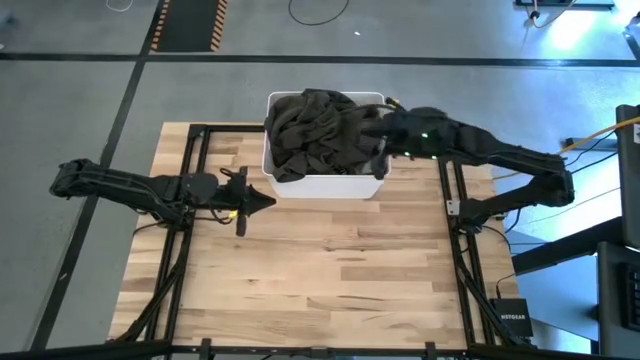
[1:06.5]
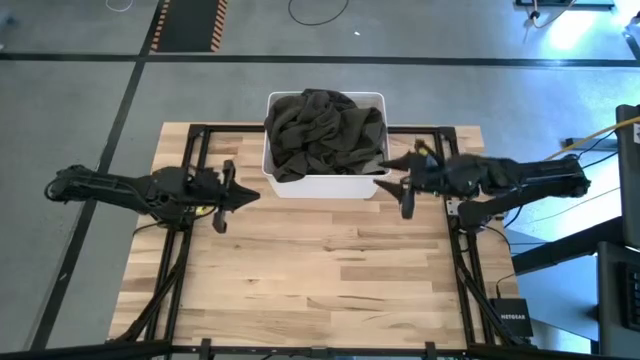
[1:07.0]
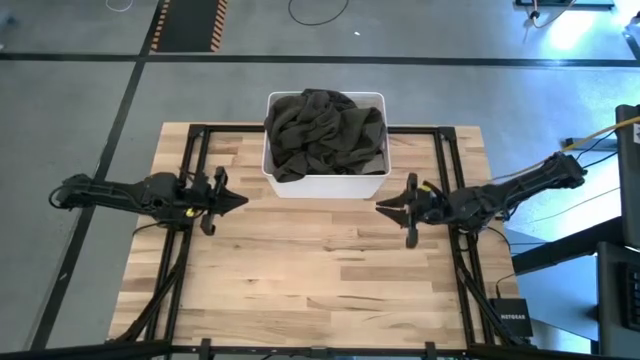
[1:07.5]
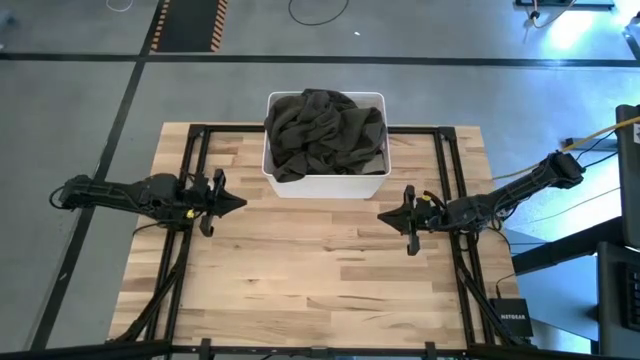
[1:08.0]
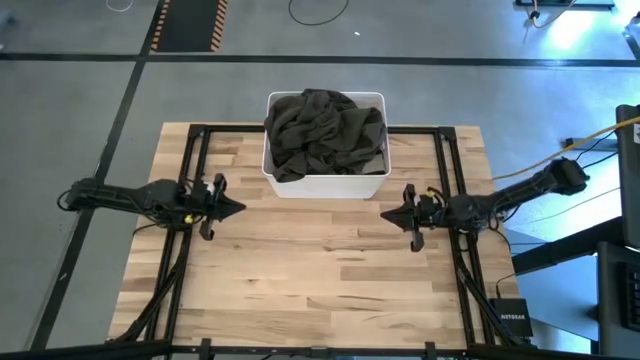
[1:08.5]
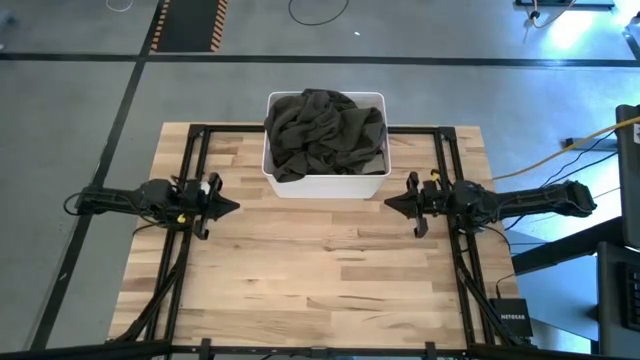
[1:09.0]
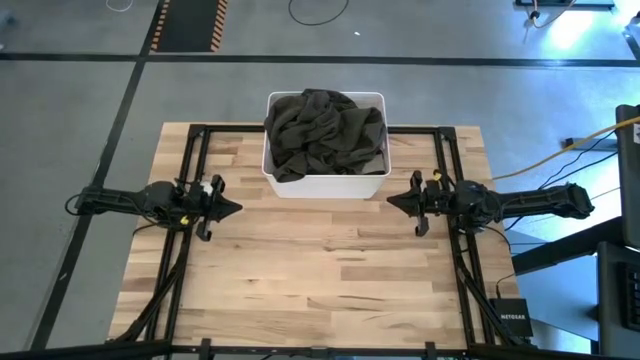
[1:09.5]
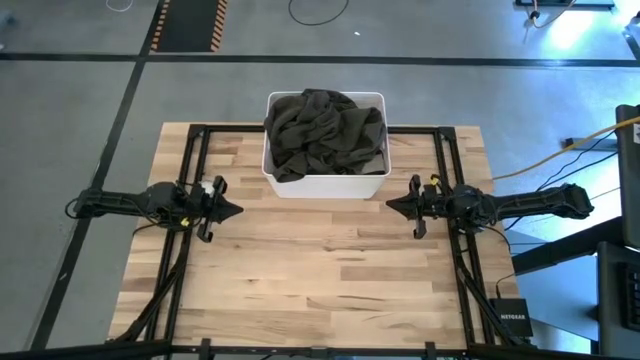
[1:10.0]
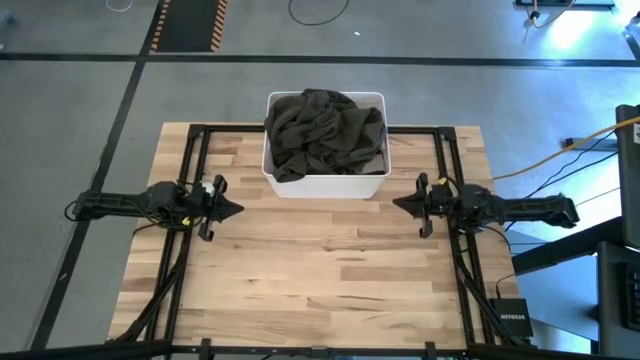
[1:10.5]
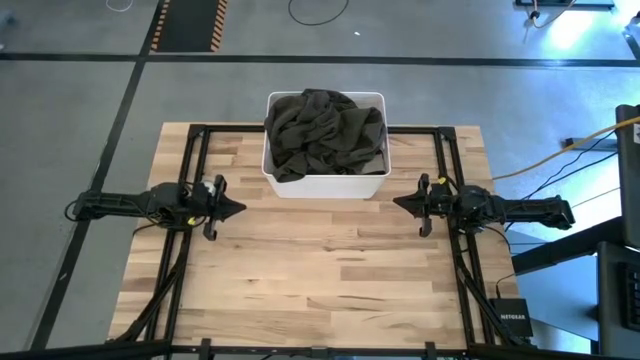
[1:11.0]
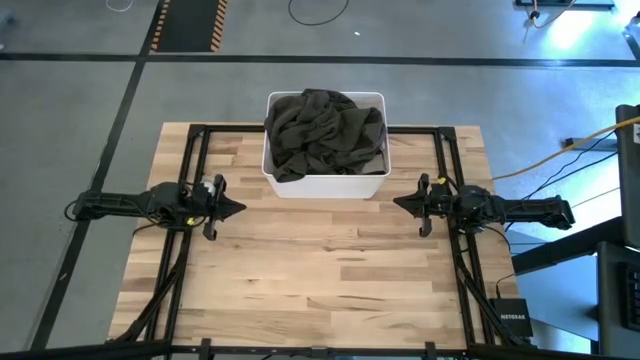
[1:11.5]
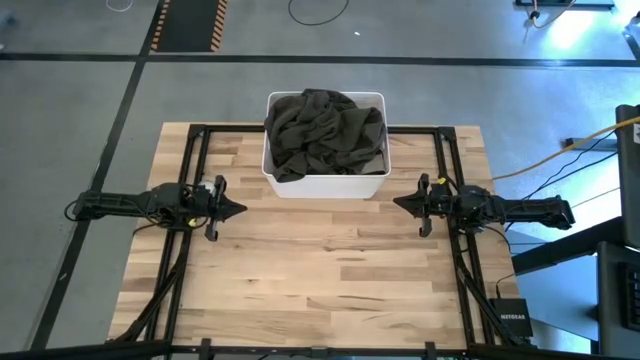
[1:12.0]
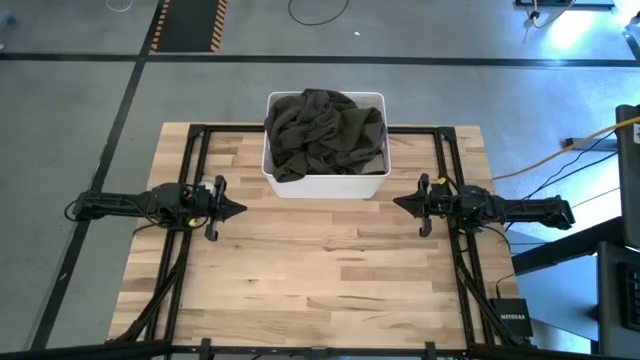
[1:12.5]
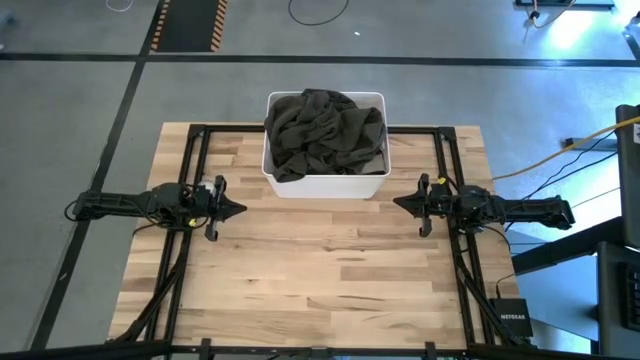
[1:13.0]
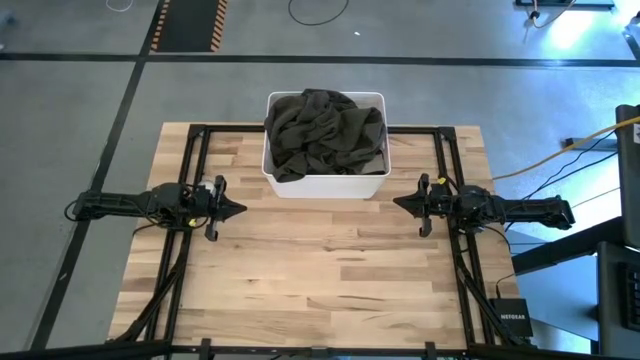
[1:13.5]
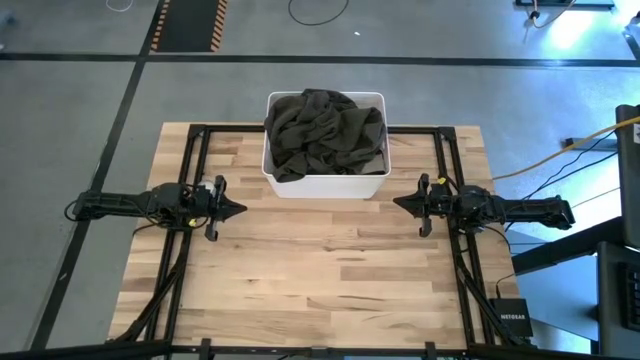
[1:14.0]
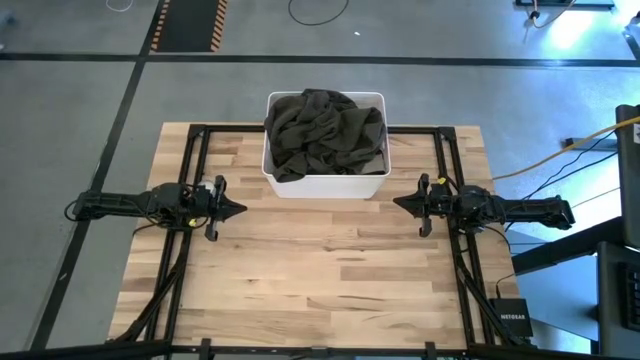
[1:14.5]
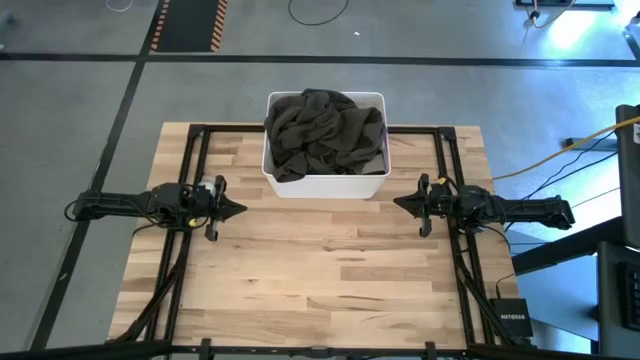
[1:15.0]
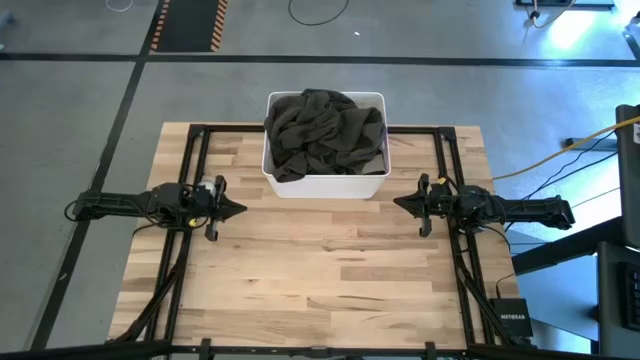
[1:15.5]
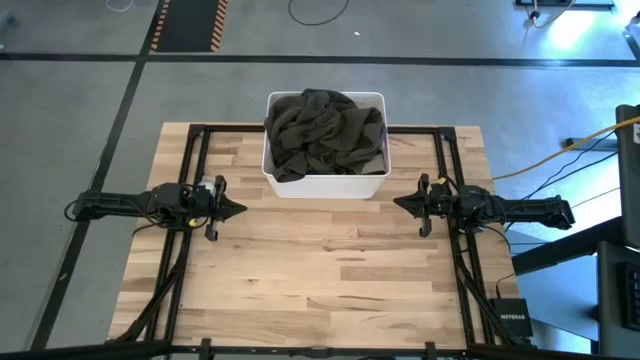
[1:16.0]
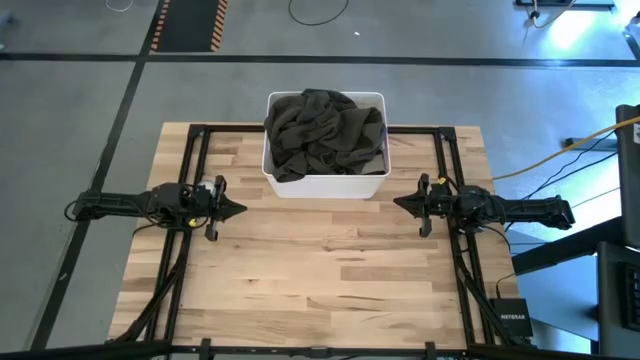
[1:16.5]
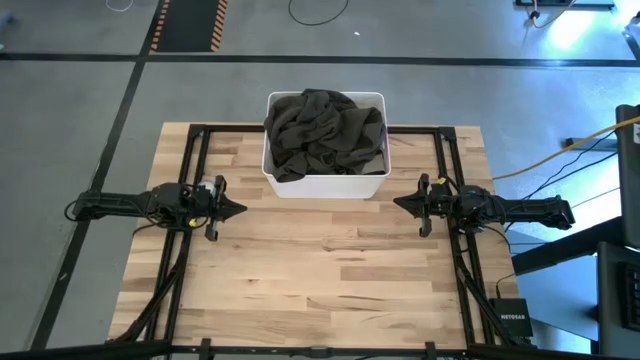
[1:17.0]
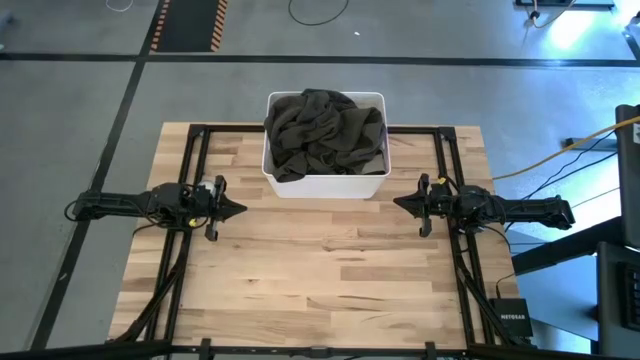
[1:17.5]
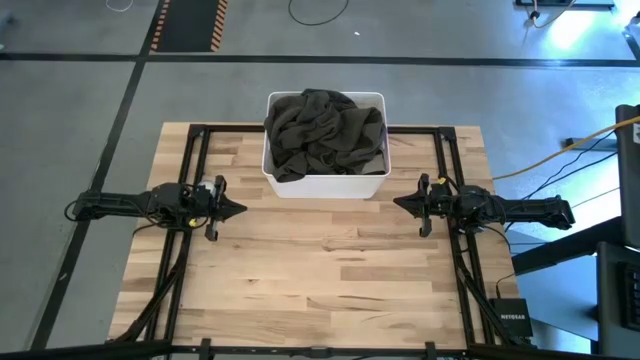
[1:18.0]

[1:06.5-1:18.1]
Task: Sort clothes
Return to Home Position

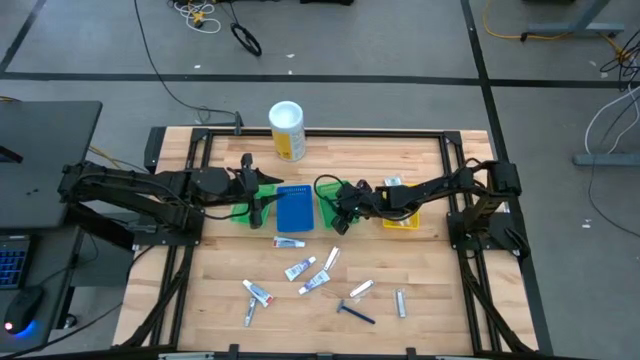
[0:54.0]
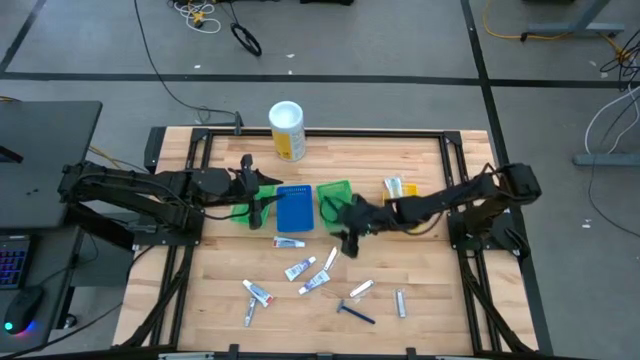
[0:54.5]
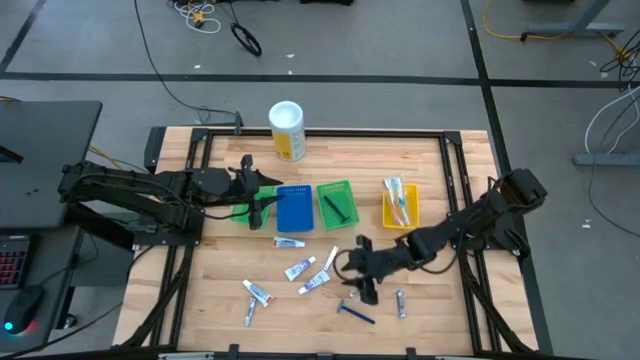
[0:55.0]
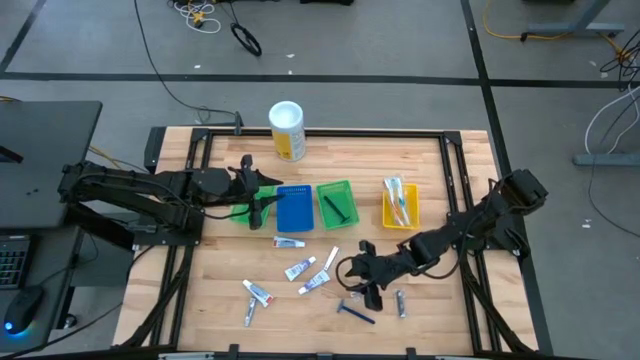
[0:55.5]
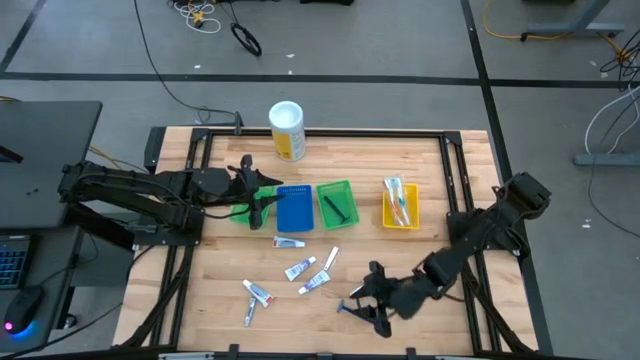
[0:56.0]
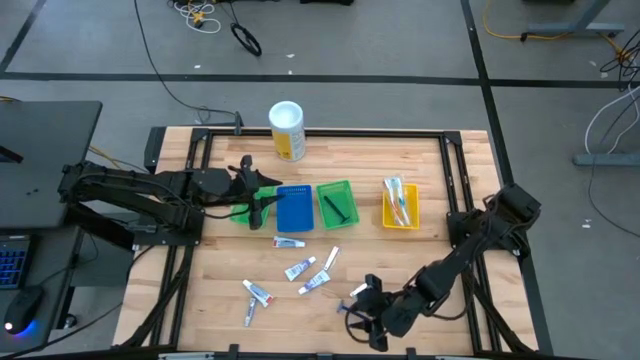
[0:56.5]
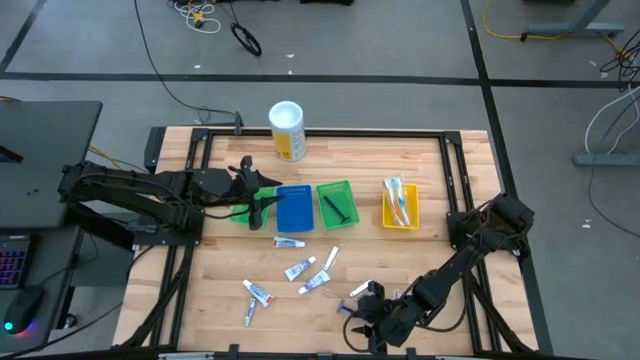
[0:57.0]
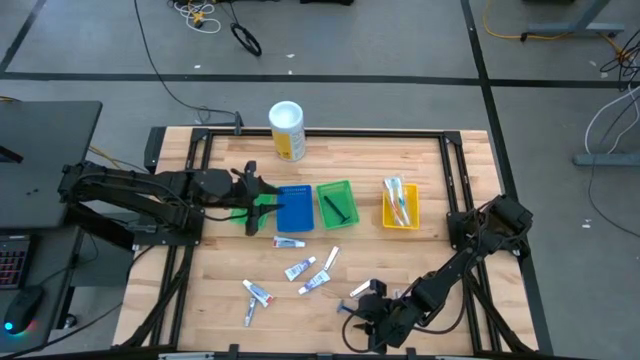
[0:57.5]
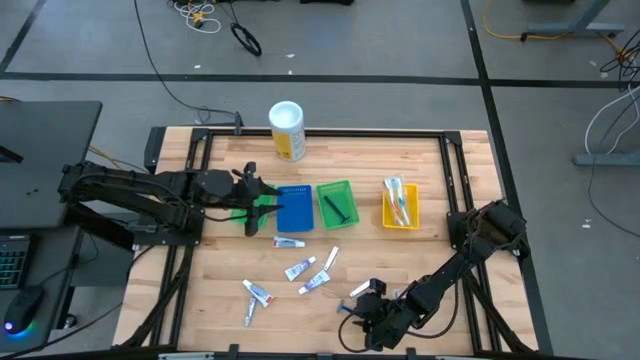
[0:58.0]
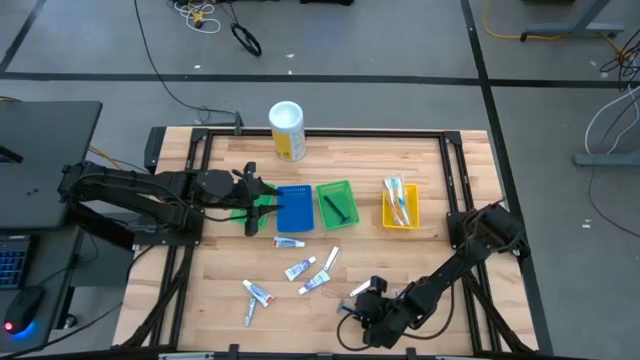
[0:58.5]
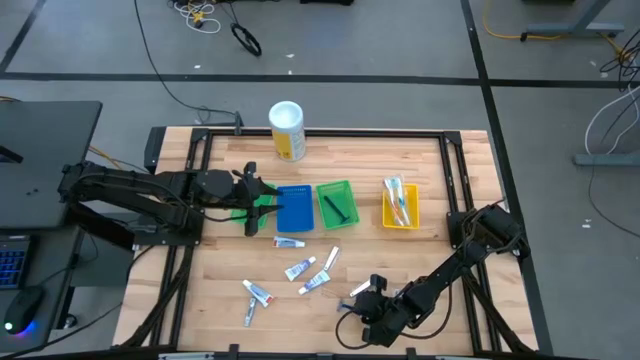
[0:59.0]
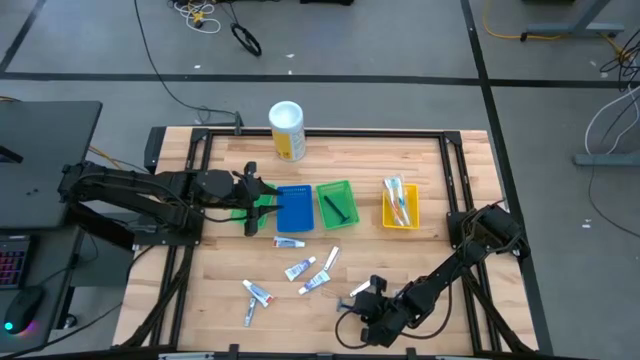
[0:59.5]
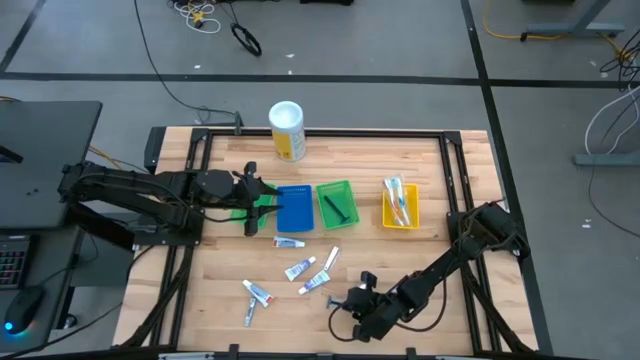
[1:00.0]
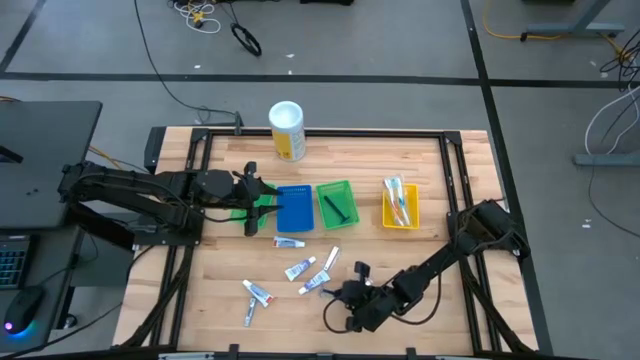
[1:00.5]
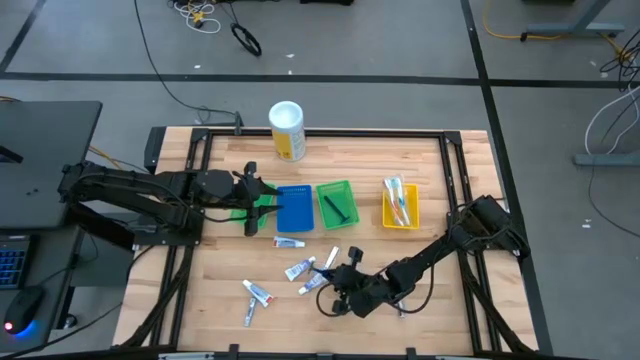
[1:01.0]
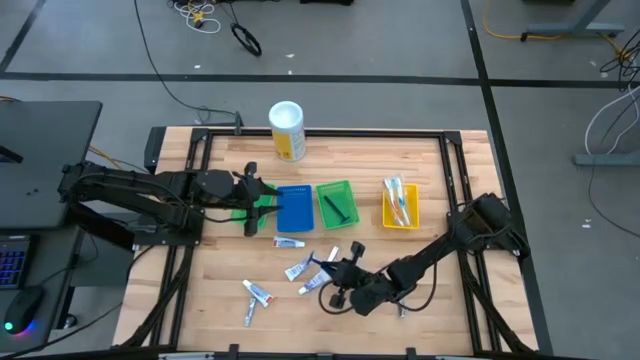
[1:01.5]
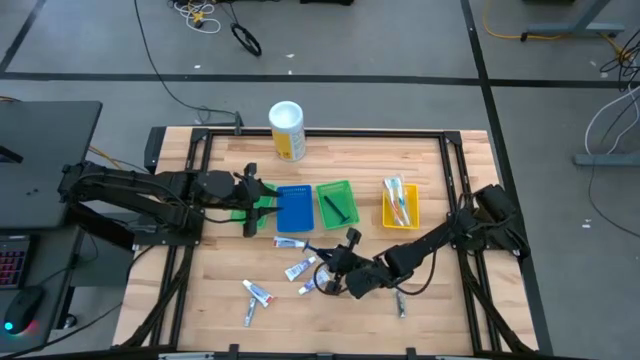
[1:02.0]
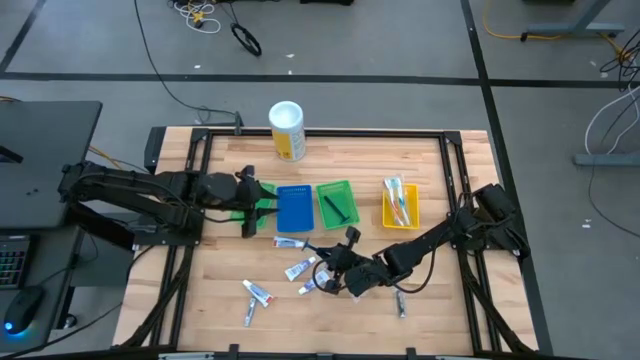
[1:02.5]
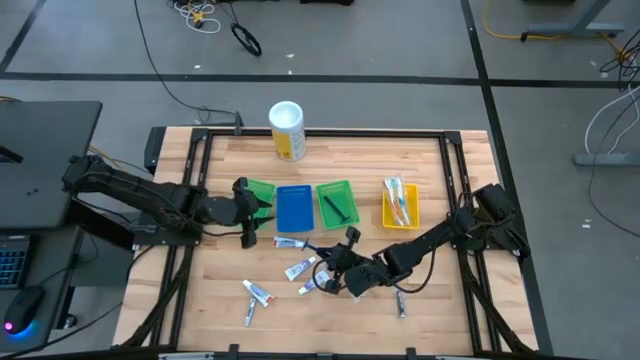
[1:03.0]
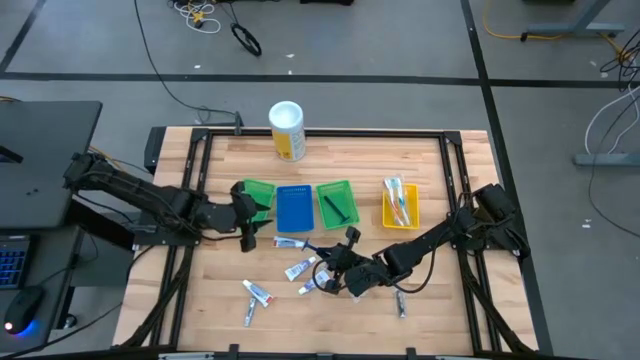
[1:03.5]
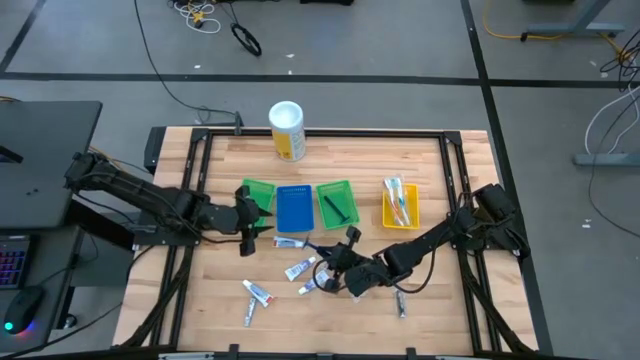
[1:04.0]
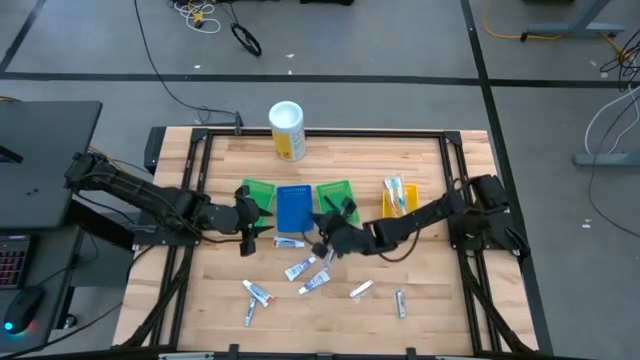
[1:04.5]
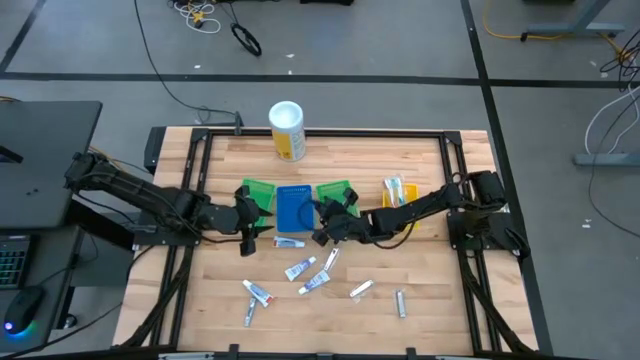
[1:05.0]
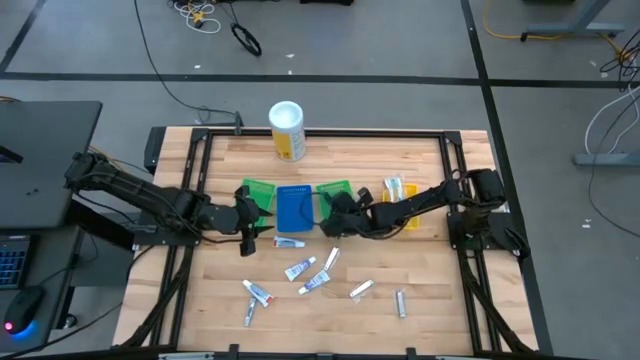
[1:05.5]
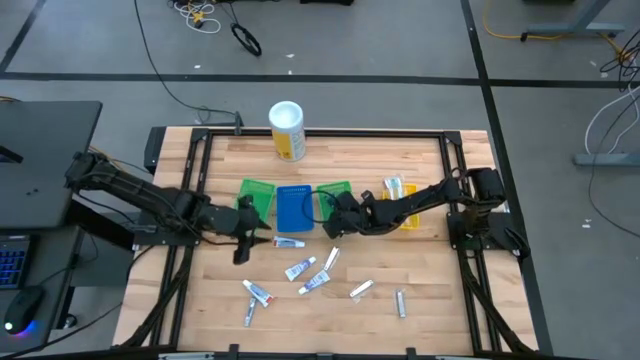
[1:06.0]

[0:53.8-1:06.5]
Task: Pick & Place Travel size toiletries
Put the blue razor into the right green bin
